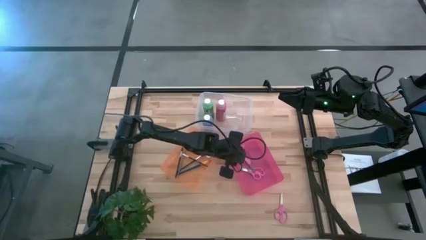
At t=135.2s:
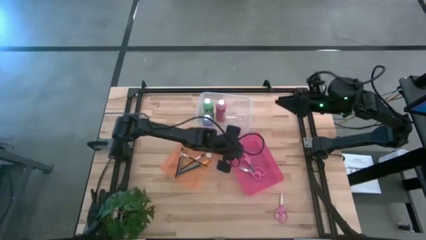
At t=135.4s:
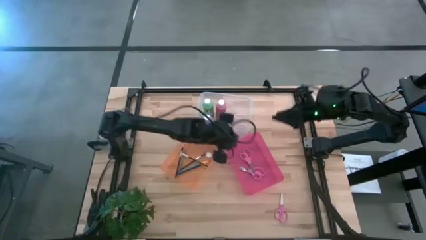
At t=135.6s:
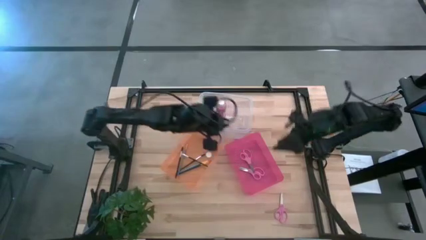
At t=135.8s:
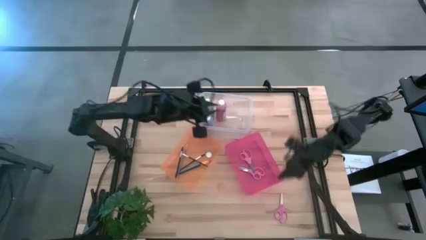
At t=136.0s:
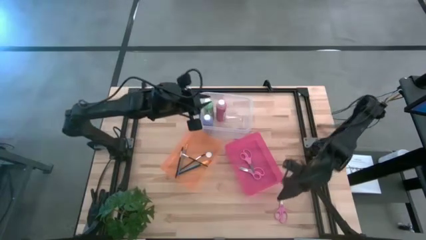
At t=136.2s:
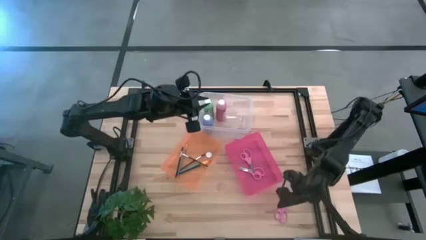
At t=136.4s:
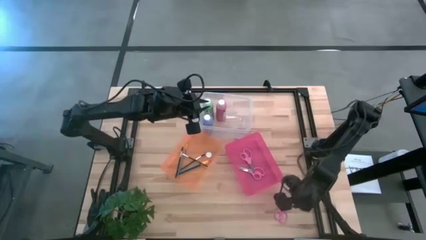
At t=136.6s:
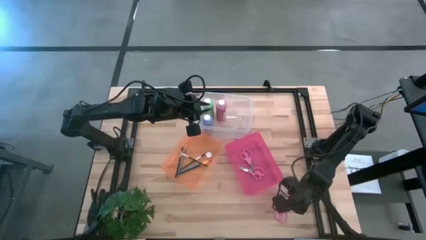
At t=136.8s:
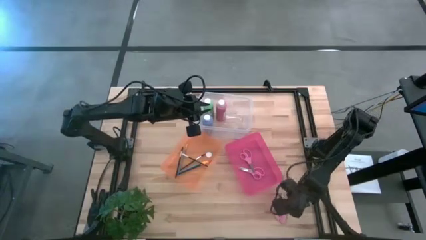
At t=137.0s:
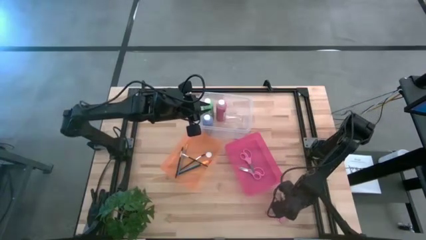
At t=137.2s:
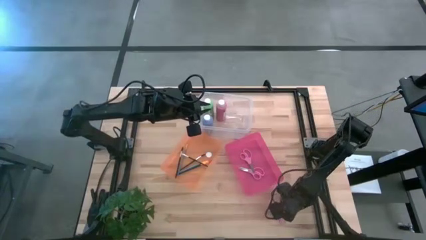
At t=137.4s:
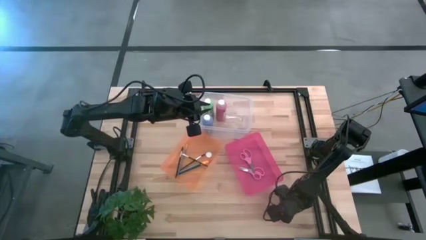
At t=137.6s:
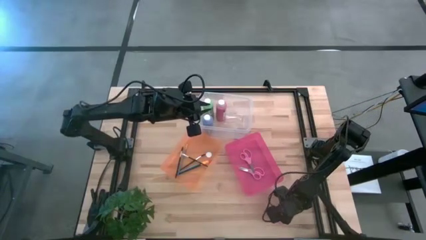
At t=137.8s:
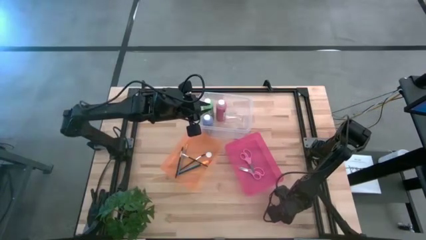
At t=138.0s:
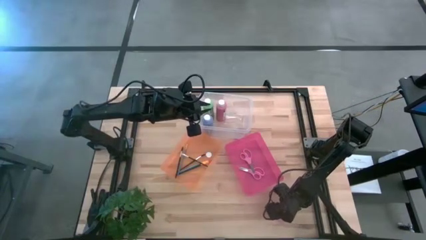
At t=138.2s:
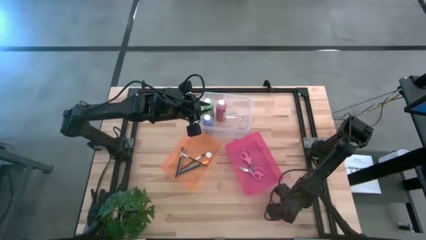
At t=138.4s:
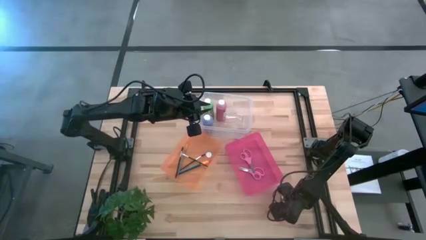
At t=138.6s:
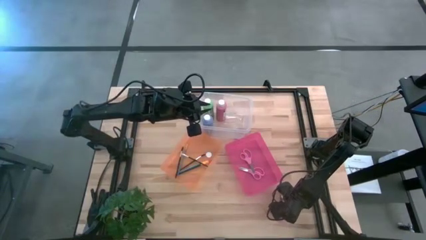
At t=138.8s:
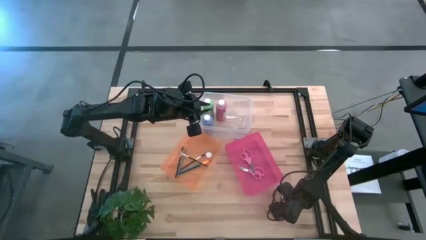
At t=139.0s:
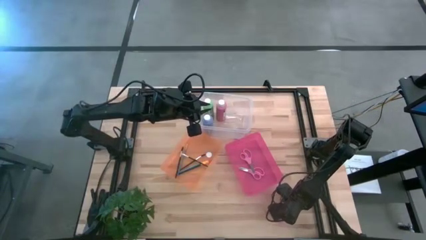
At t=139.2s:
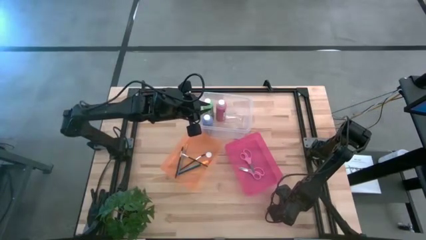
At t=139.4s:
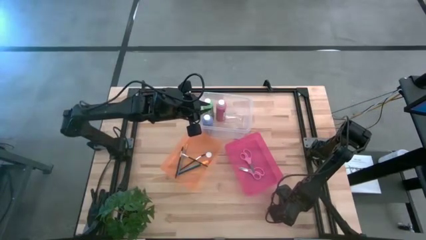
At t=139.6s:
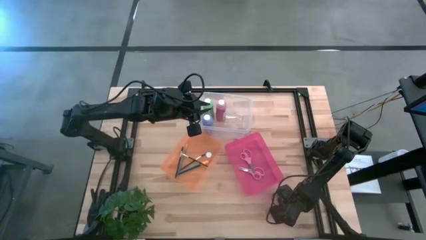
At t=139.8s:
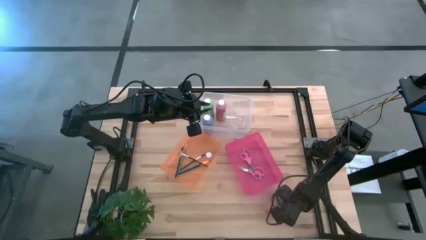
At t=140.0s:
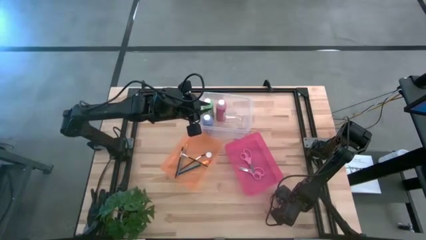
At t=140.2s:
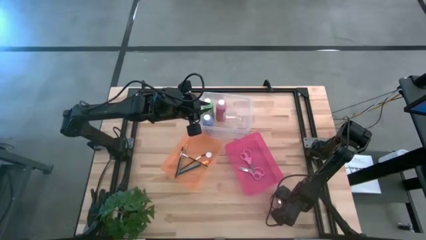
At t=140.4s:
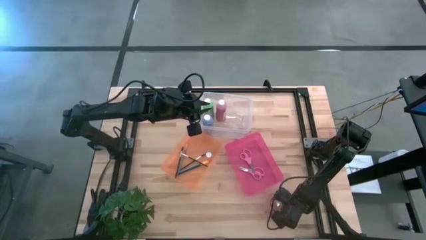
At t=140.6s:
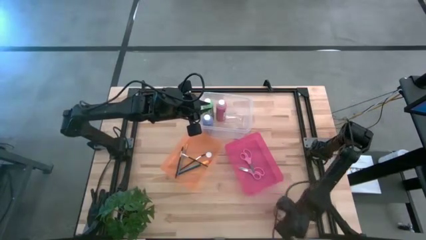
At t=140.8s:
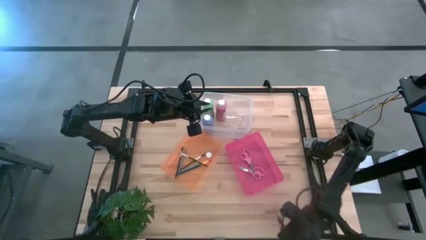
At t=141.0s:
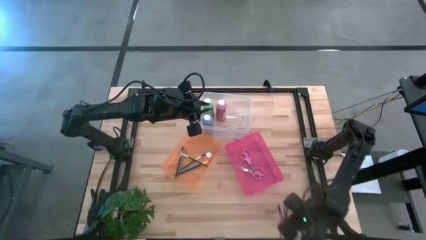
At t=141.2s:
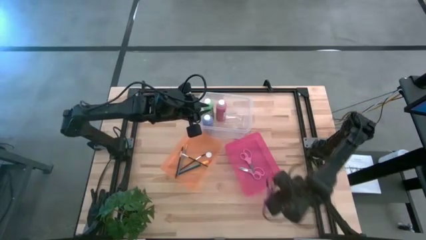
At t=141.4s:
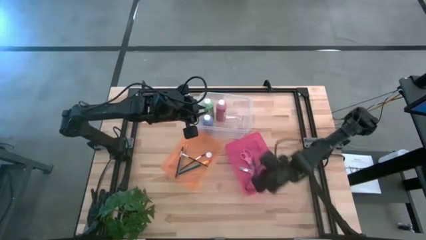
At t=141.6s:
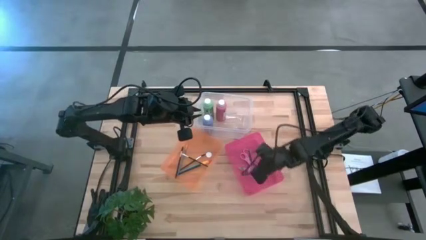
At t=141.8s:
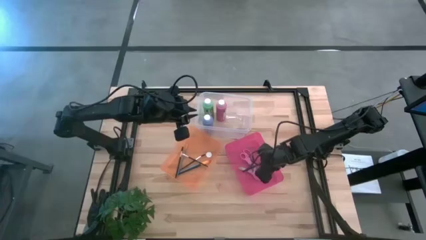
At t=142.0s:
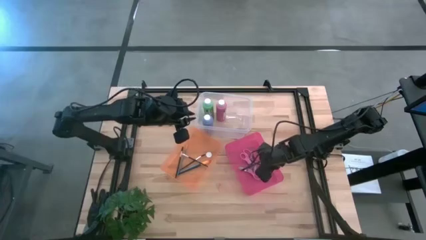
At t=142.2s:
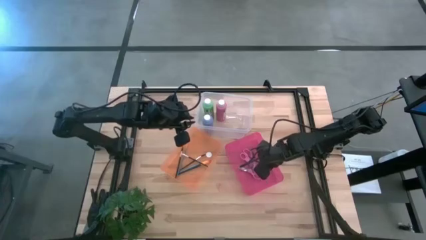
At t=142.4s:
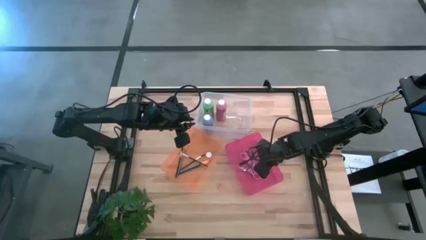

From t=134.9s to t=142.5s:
Task: Pick & Place Paint Supplies
Put the pink scissors into the pink bin

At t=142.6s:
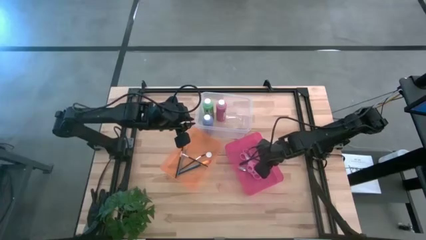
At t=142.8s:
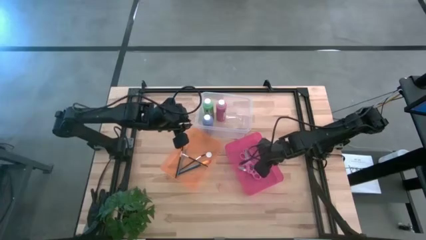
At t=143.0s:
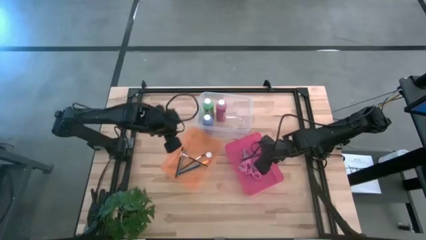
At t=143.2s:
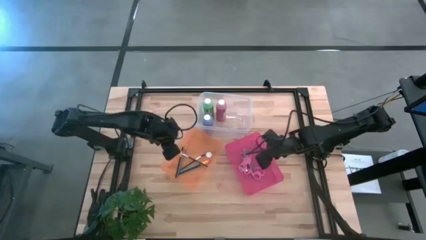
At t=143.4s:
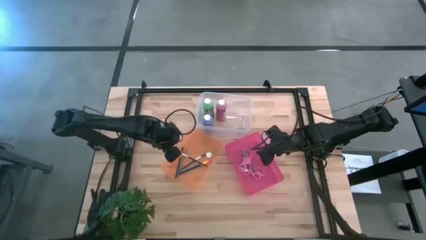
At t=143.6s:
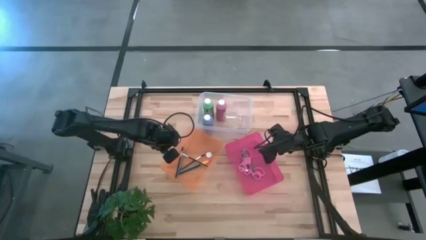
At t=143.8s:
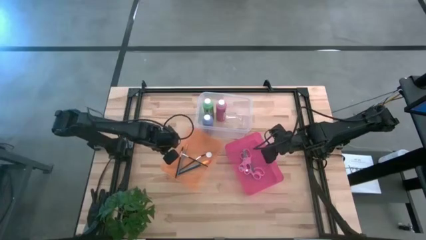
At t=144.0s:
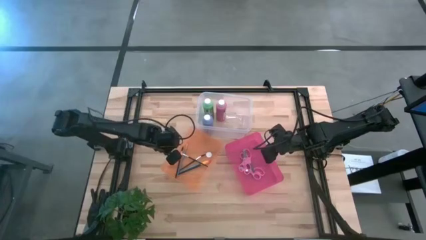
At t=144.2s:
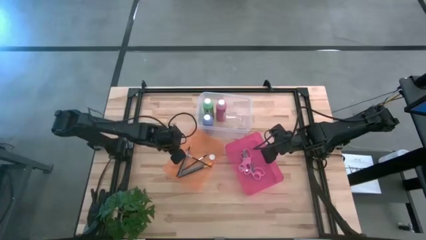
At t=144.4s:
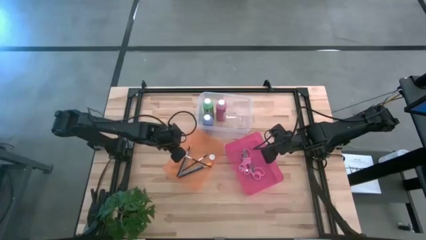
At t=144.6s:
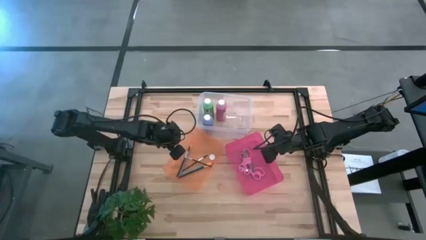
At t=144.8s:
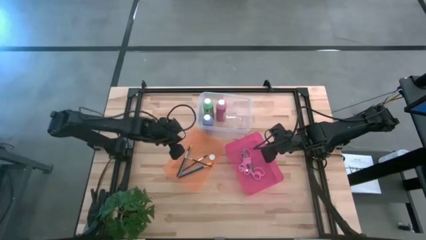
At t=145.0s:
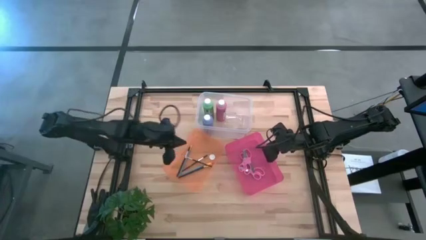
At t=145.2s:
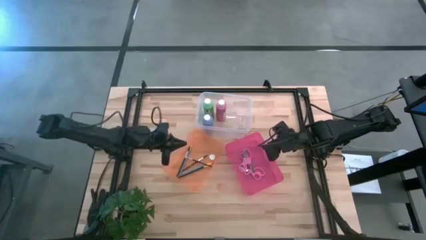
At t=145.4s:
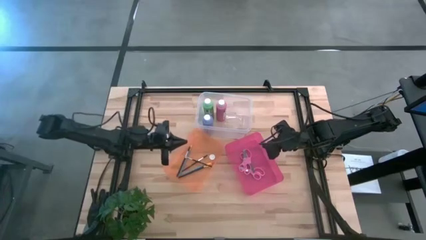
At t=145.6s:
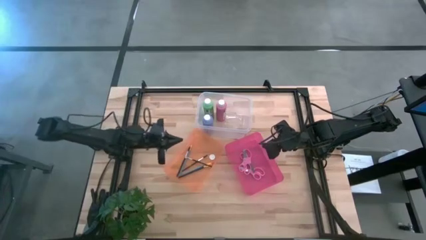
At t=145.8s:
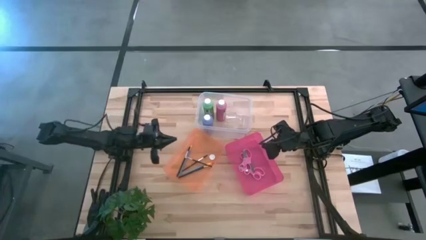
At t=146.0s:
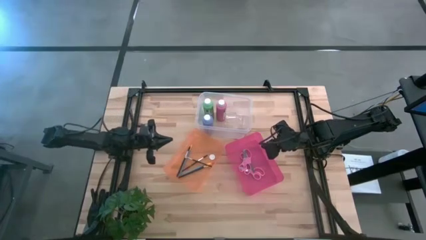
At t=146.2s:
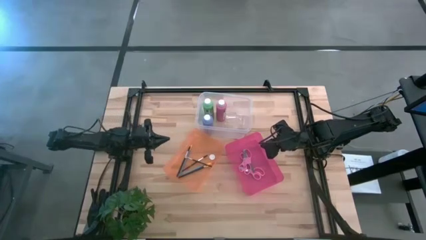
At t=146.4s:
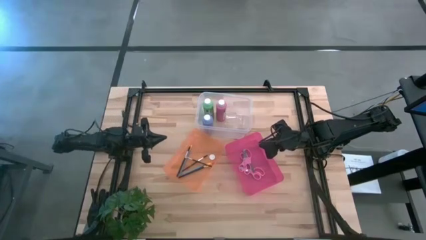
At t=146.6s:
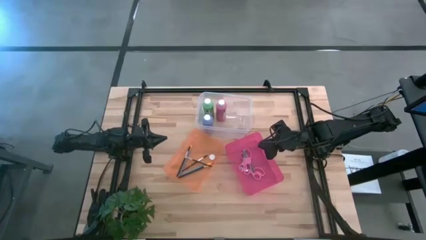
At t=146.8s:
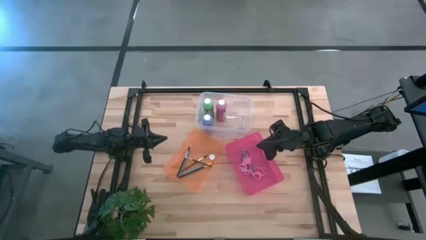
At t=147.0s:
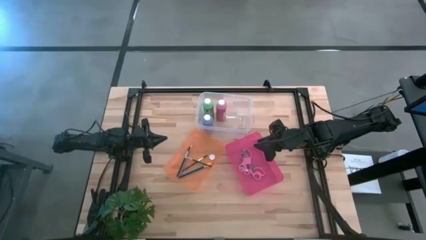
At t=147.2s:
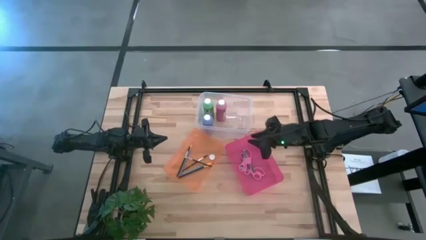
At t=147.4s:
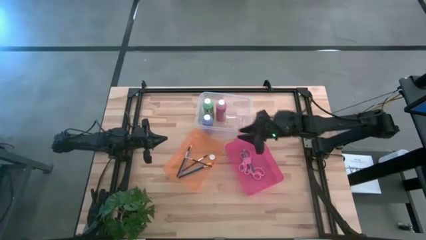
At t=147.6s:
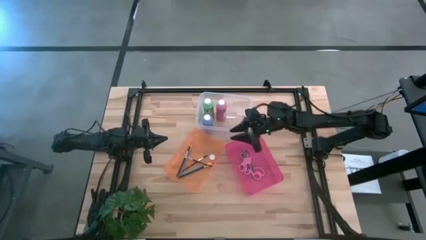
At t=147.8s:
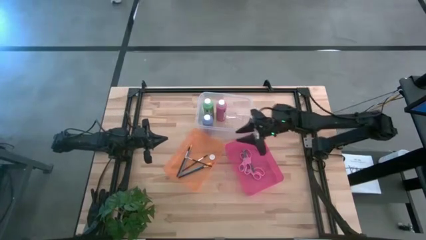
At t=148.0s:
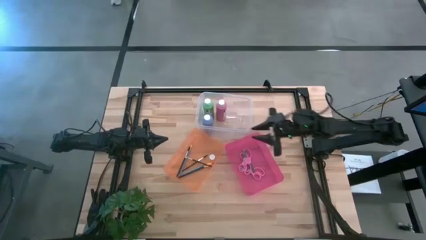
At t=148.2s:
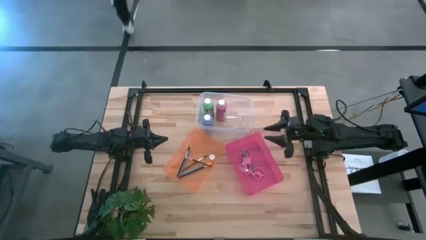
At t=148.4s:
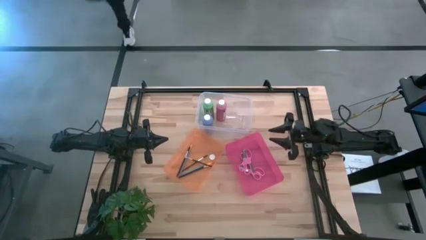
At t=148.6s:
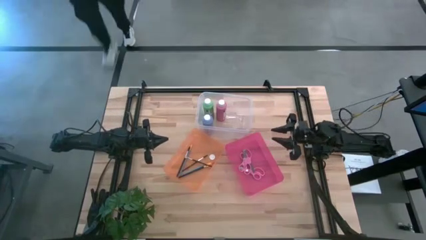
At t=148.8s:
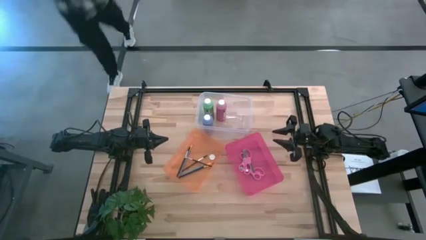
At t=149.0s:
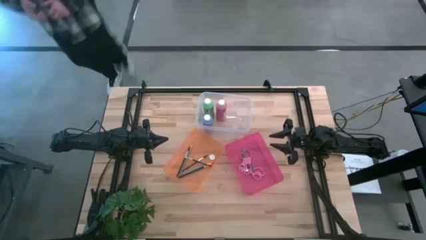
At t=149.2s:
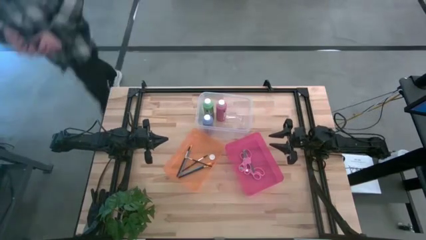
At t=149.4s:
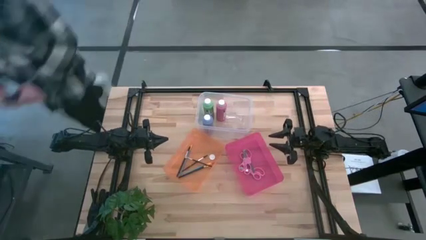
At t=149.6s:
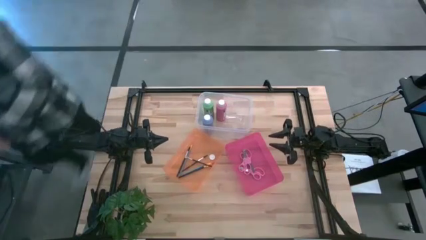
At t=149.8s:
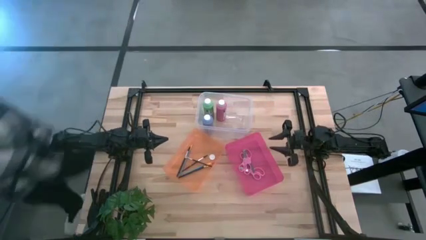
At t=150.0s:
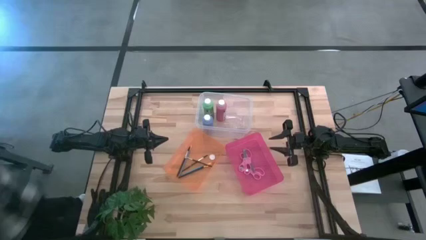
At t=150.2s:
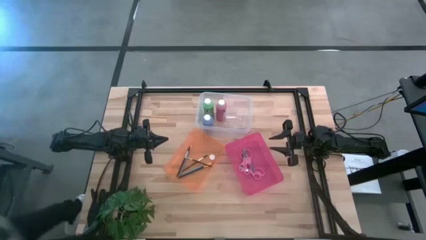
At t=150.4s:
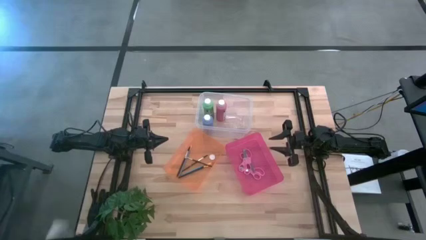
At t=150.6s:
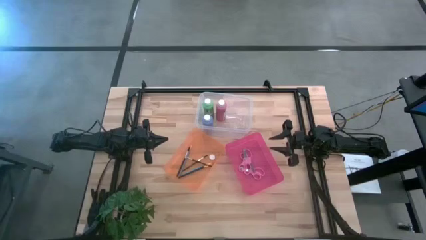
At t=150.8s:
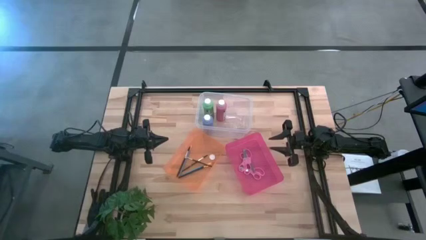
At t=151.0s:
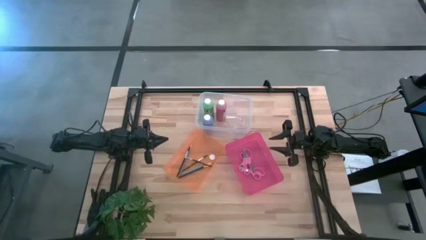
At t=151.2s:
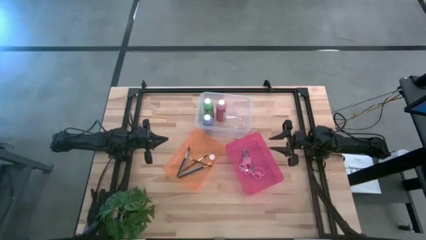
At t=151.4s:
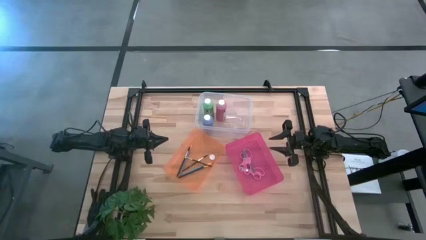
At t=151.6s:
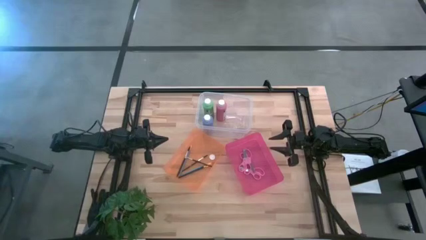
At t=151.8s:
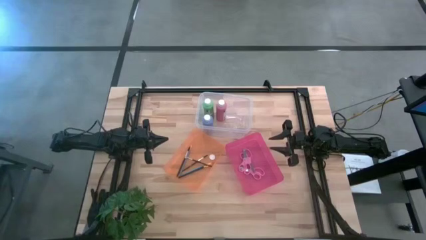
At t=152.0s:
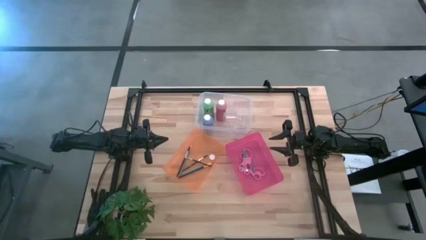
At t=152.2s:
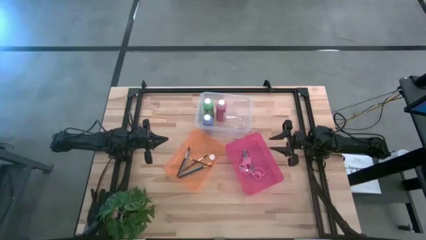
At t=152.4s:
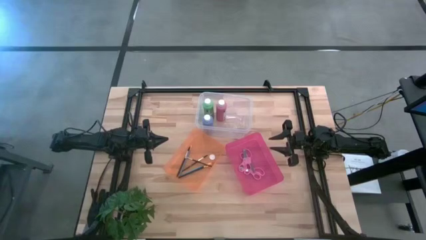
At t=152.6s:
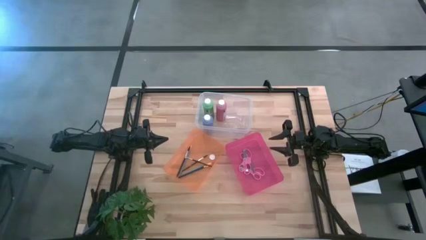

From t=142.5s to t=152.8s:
Return to Home Position
